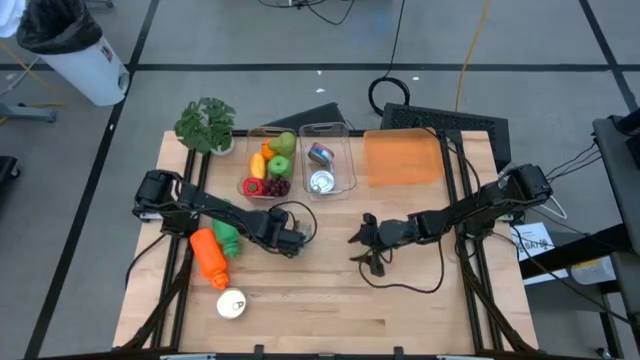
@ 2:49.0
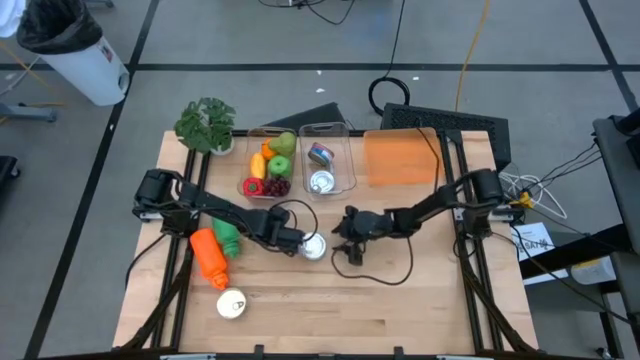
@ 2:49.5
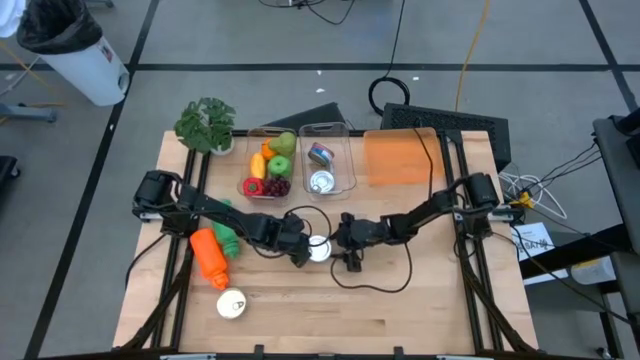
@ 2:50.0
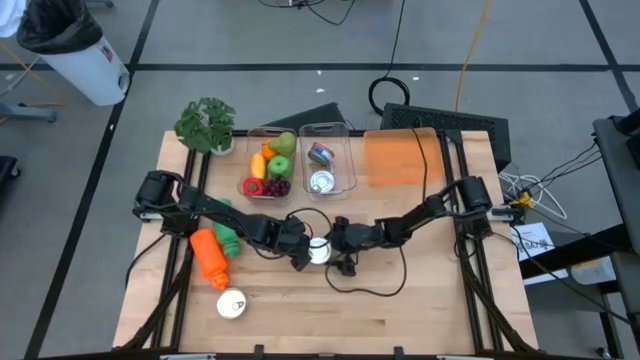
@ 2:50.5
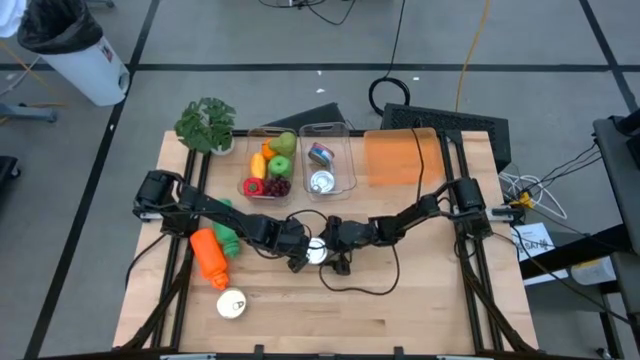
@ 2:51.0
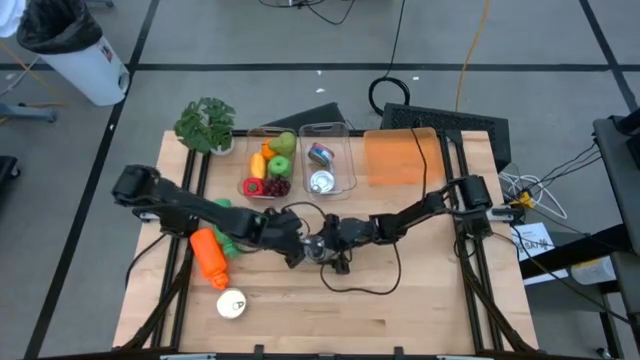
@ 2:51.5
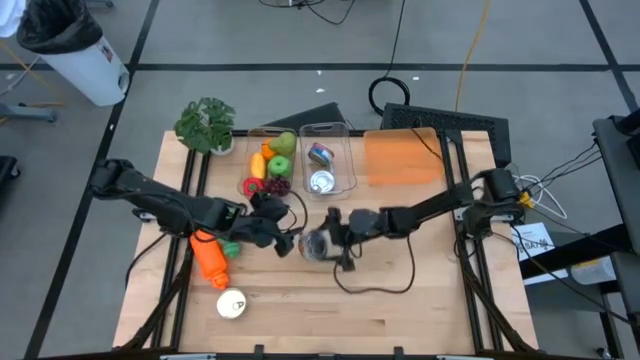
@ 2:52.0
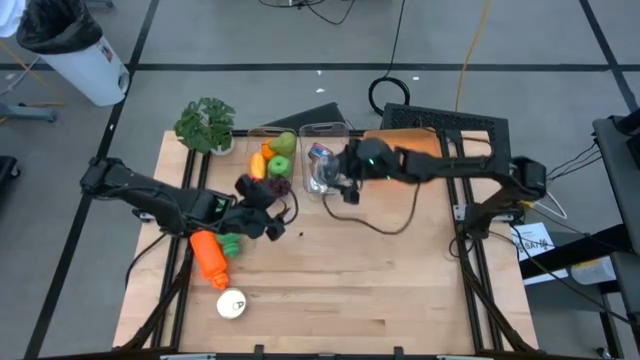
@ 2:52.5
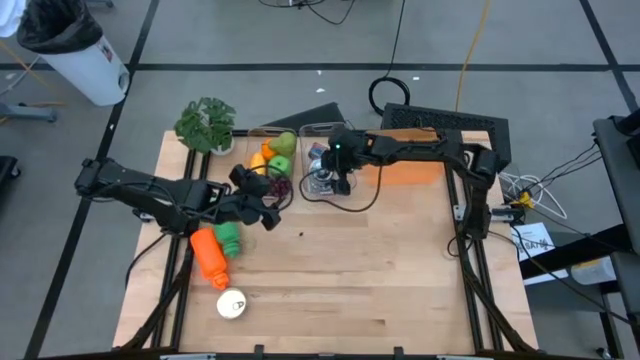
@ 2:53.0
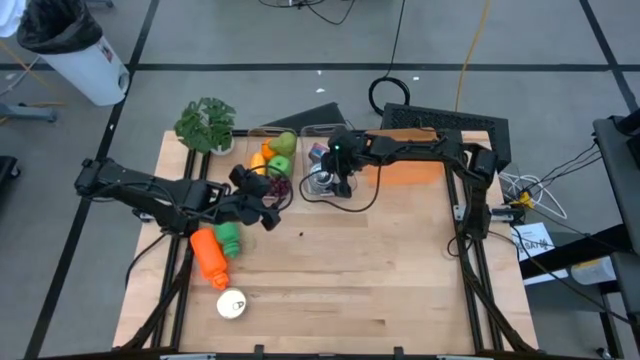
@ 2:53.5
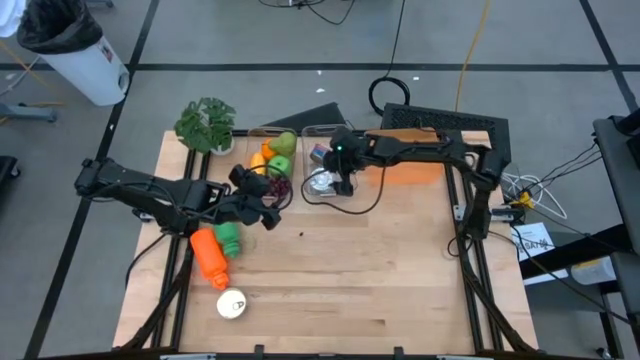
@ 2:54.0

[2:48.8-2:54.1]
Task: Pick & Place Food Item
Put the green tuna can into the right transparent bin

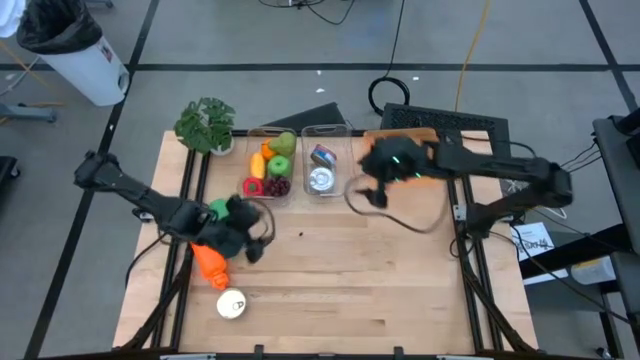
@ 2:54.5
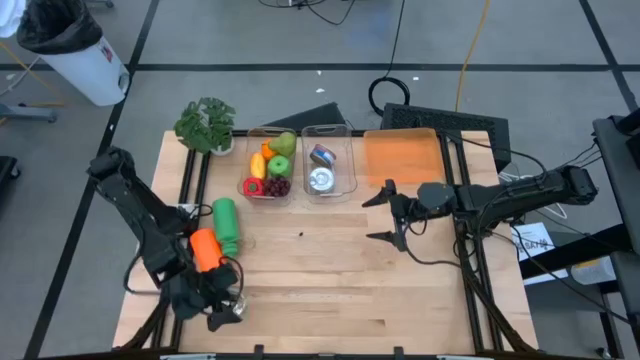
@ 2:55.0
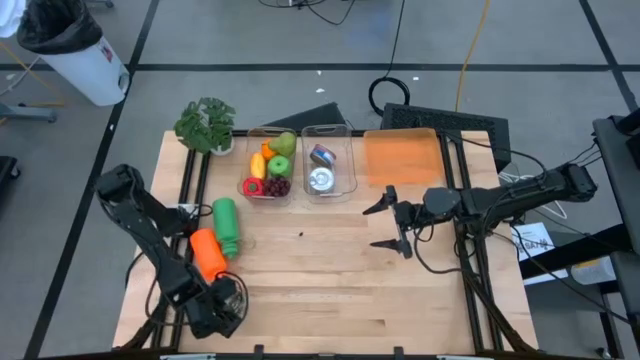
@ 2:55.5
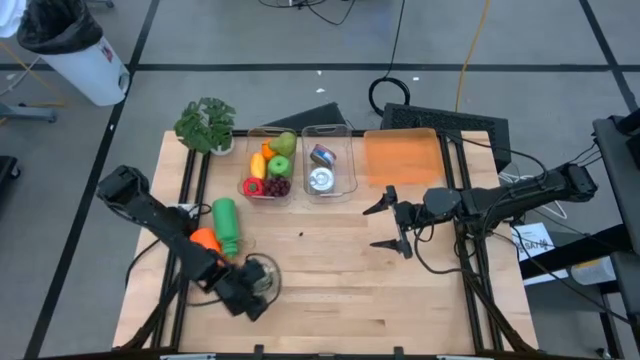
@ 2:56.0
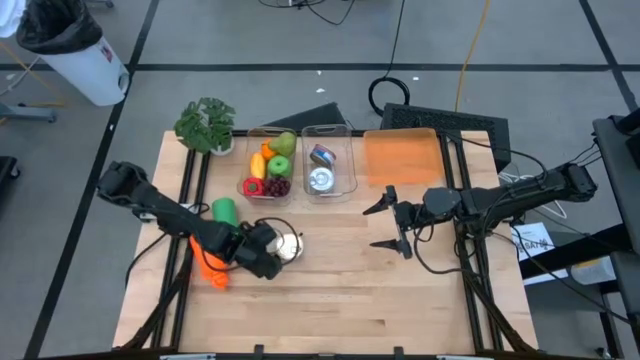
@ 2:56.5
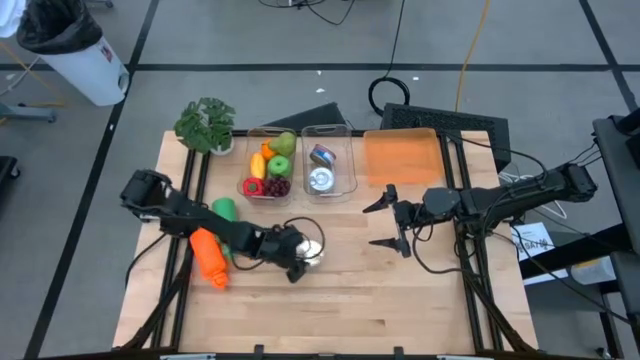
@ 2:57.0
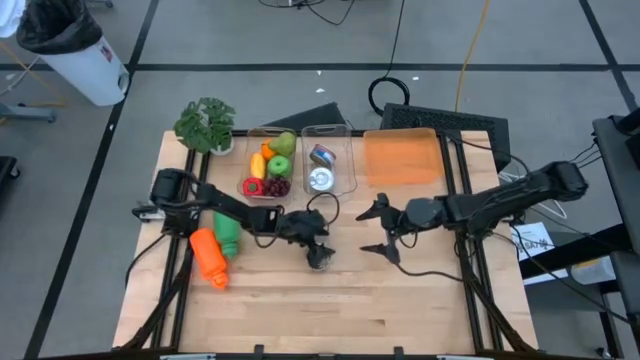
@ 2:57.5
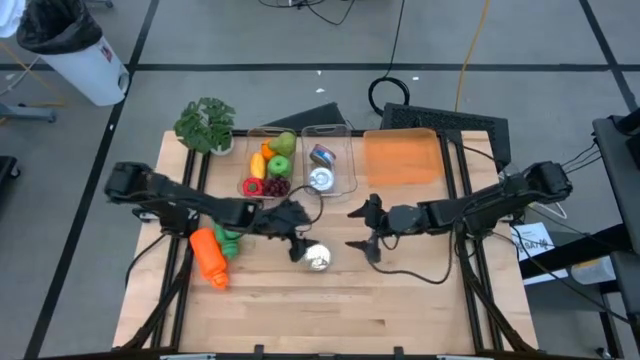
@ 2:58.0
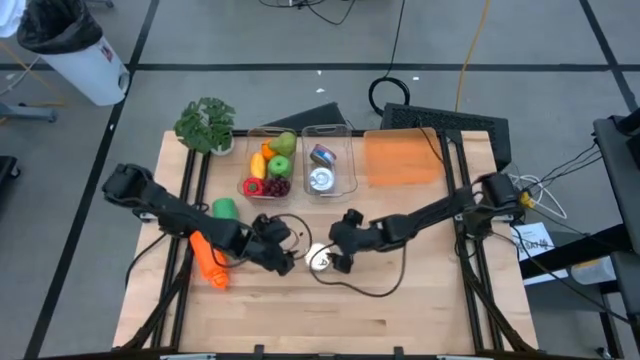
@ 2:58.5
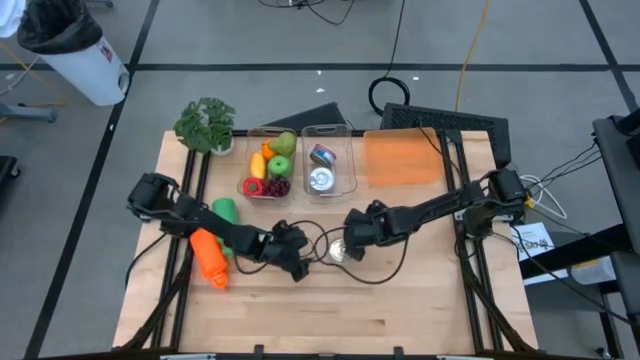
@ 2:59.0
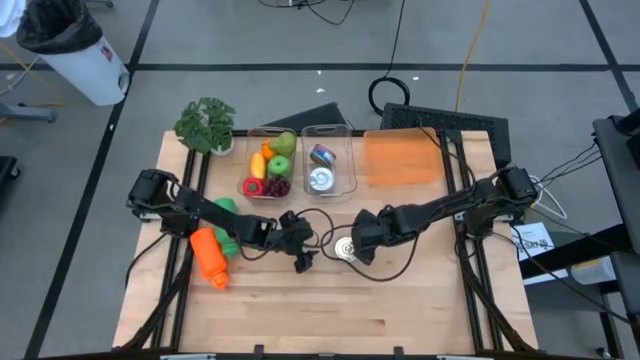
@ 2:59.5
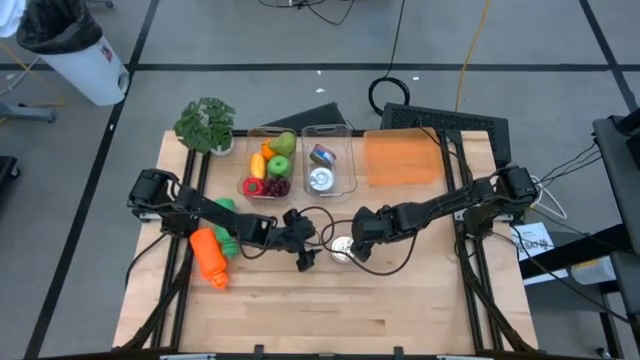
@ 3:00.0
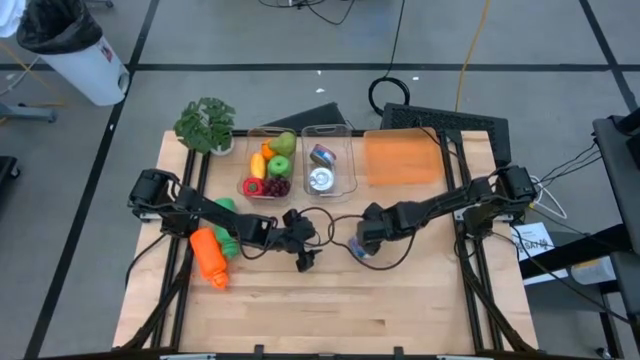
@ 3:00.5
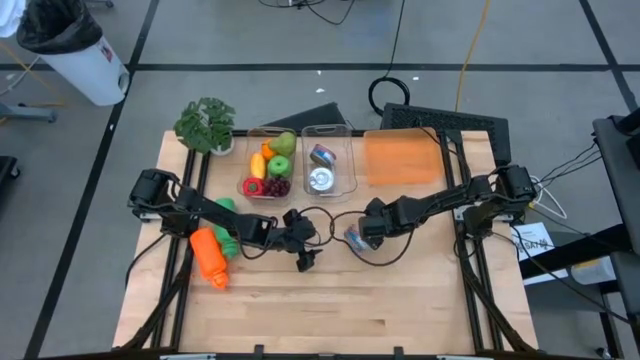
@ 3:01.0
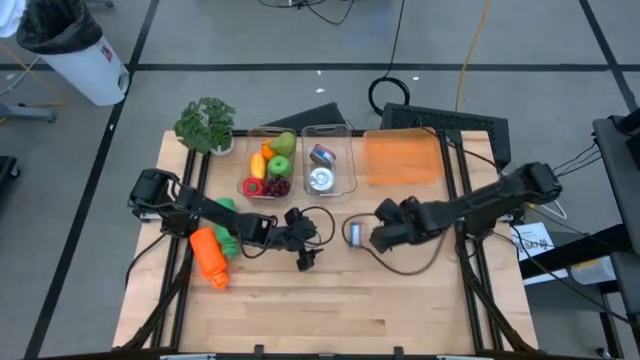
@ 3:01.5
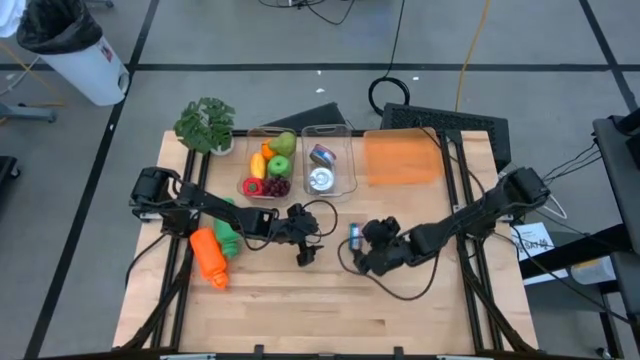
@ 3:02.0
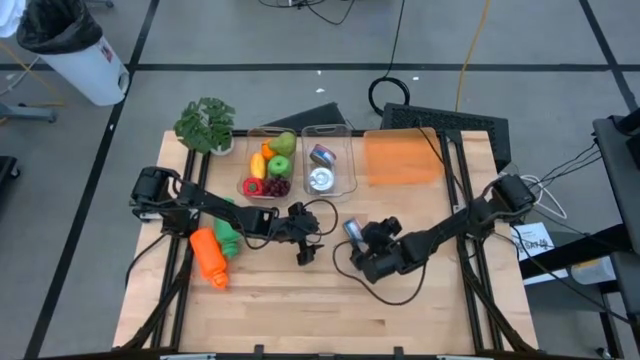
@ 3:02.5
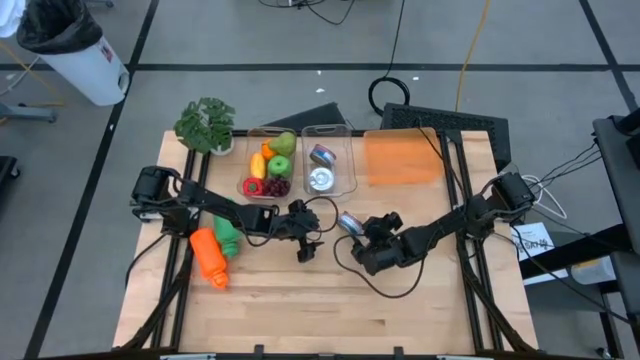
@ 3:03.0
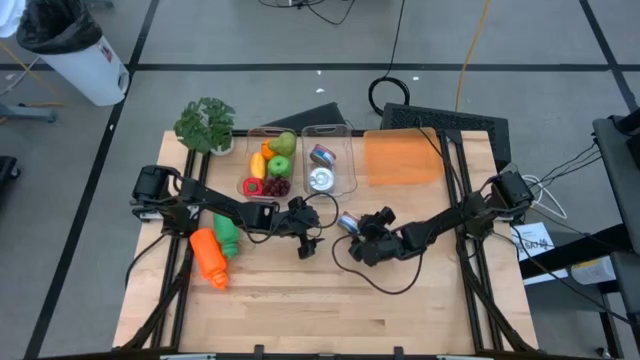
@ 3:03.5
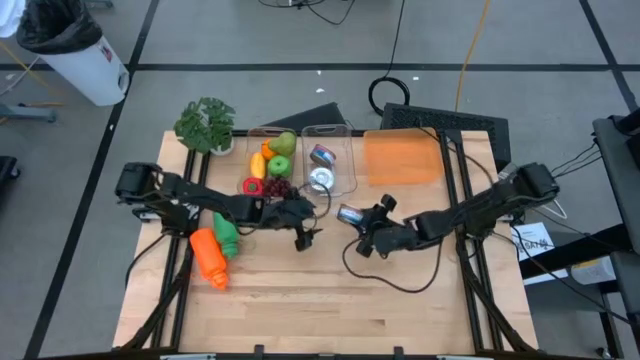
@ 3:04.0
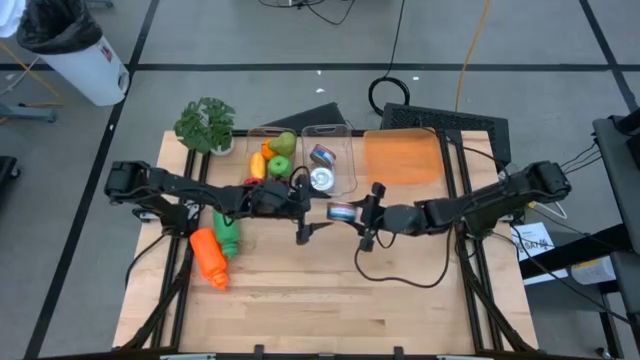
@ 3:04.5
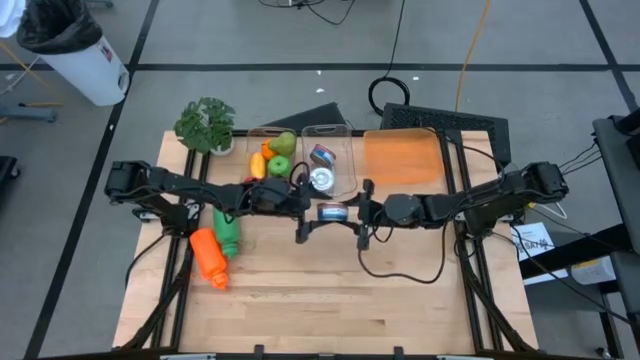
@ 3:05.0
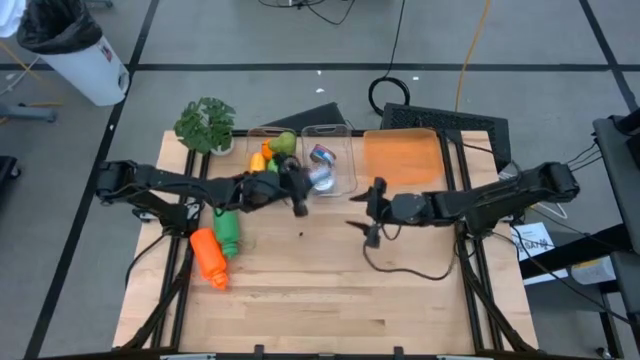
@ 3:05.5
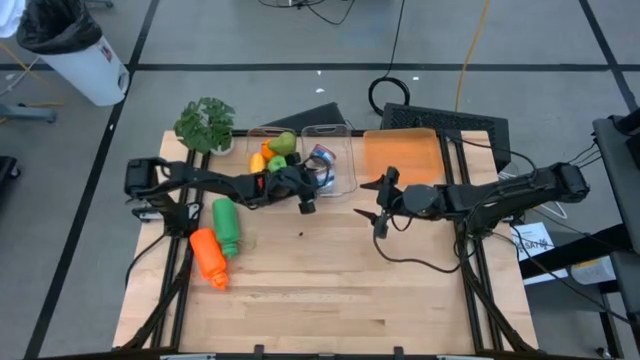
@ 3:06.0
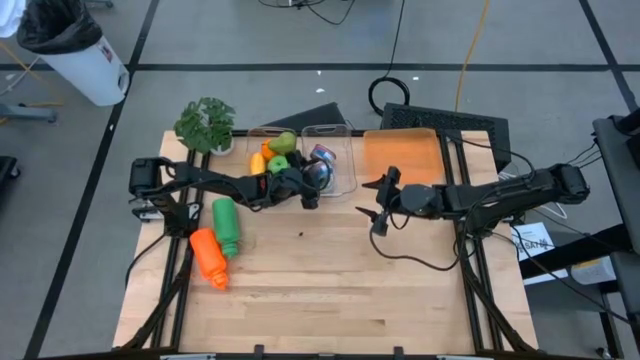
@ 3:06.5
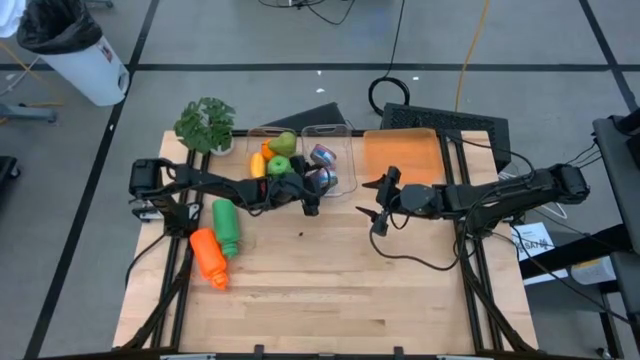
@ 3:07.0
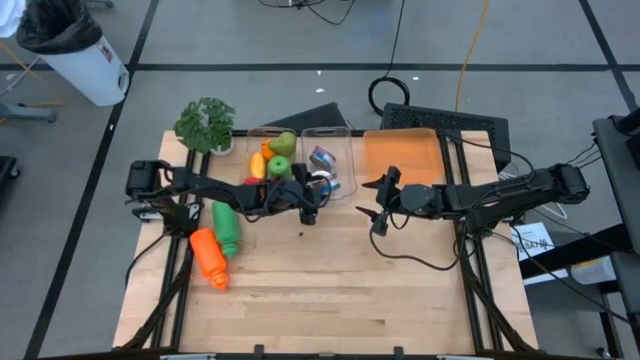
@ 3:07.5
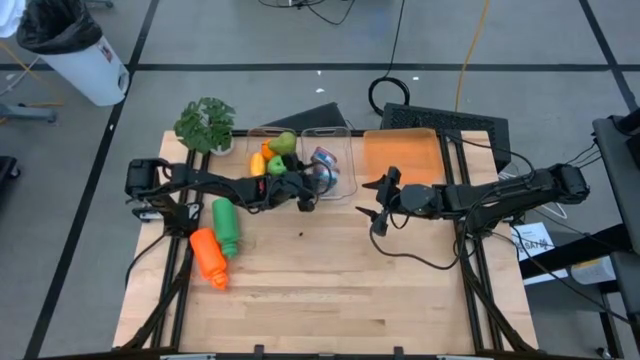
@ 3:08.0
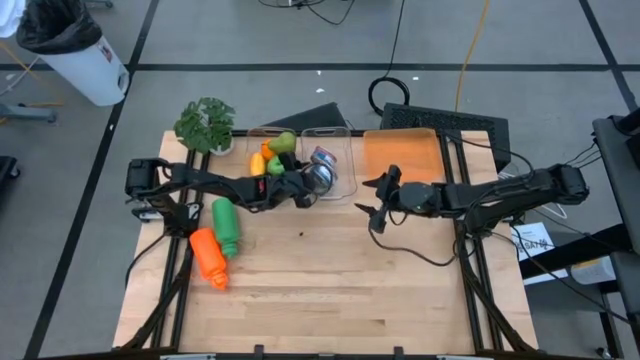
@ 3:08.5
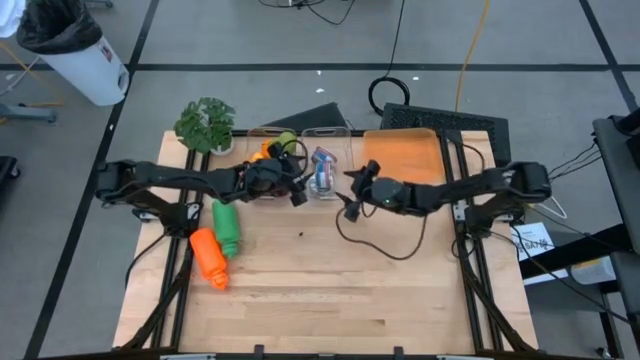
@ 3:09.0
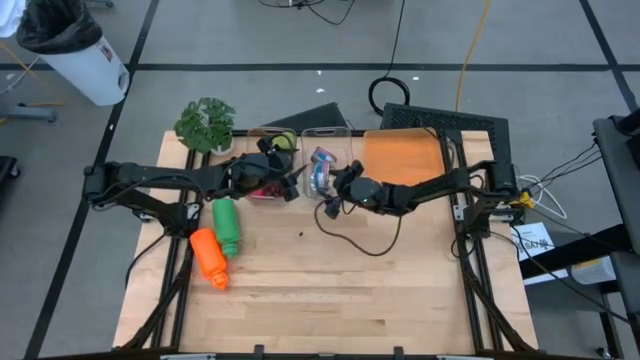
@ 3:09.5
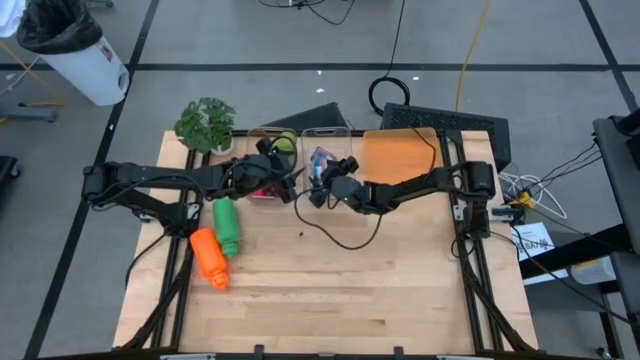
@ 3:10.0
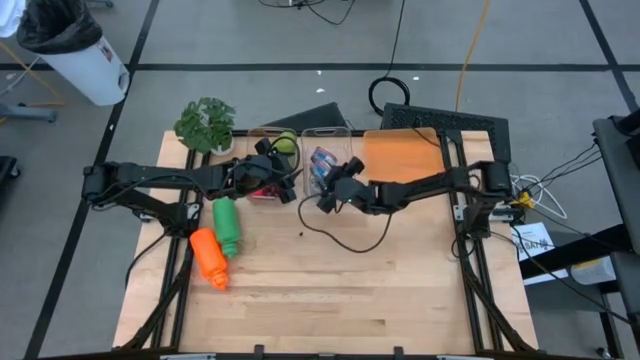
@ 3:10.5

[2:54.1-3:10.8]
Put the blue pink tuna can into the right transparent bin
